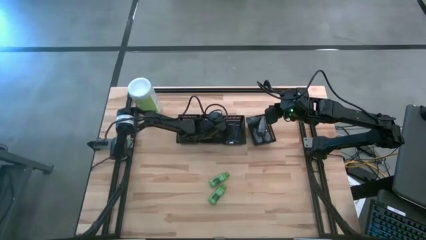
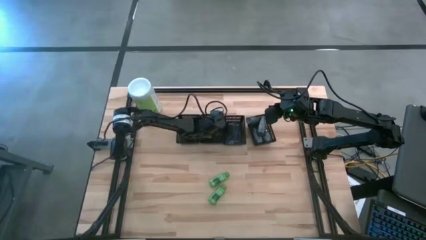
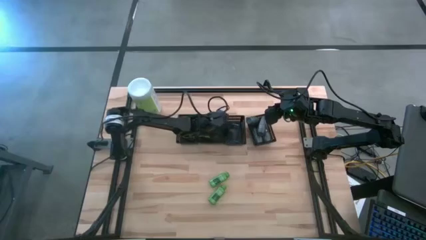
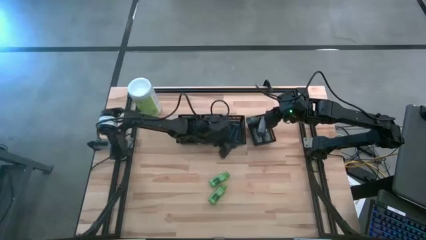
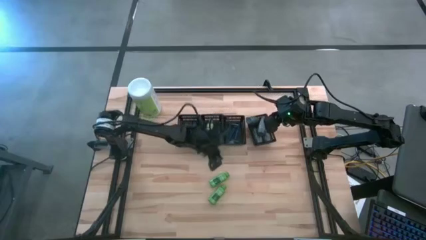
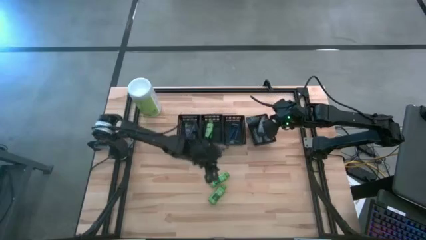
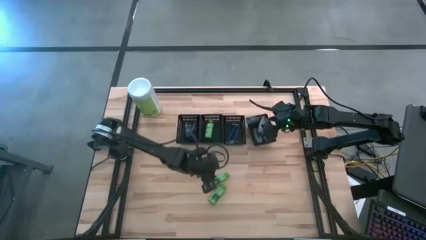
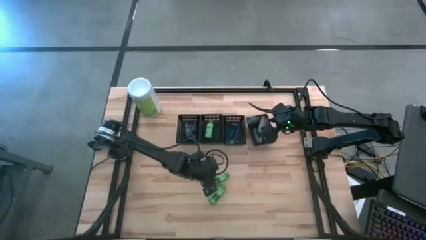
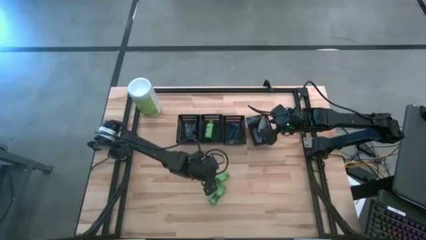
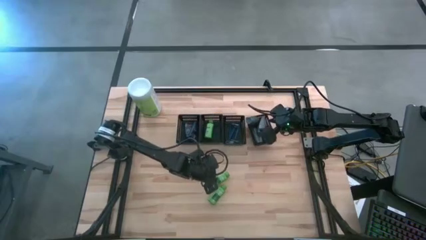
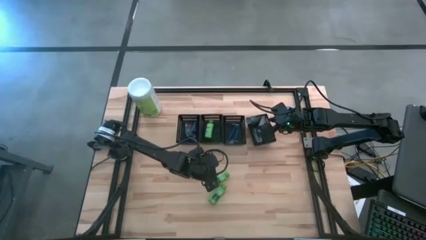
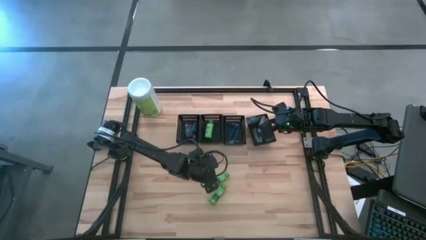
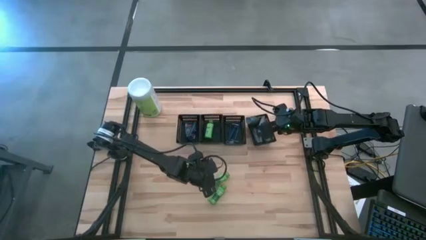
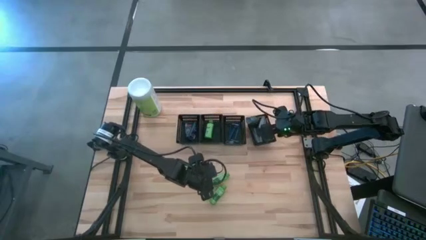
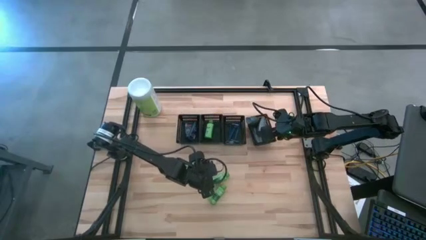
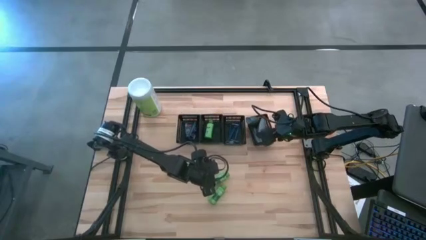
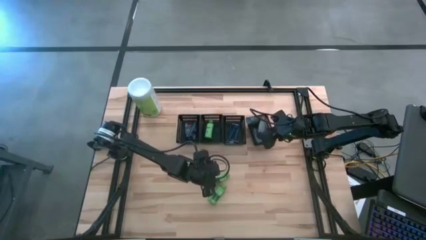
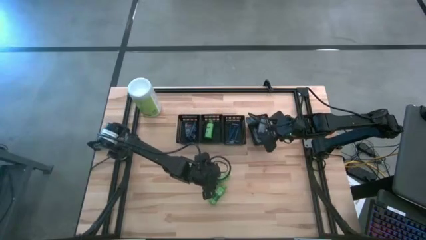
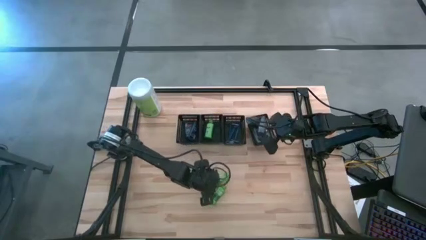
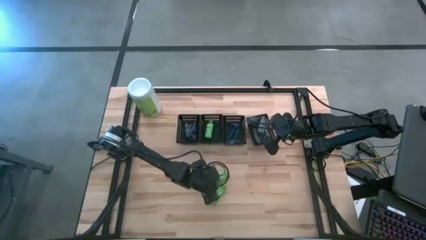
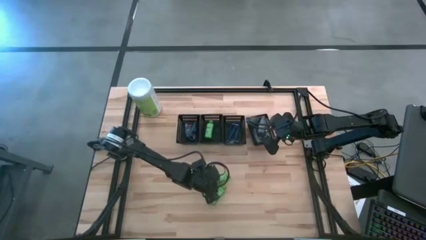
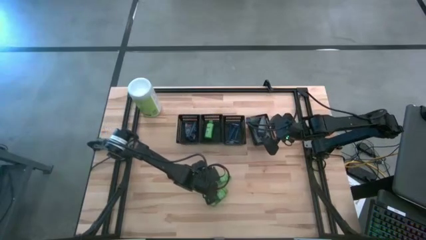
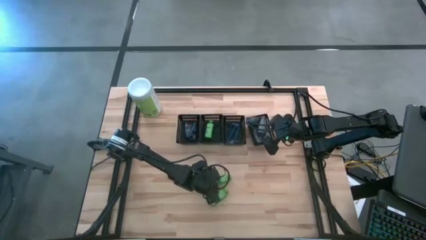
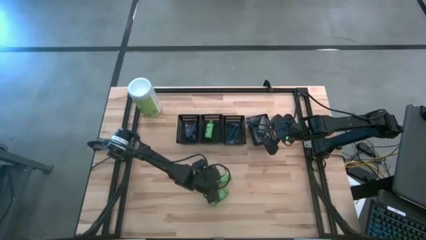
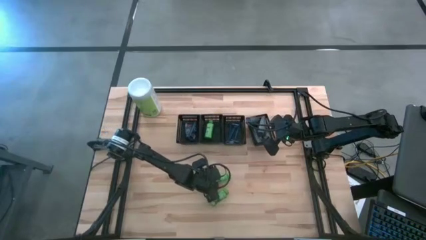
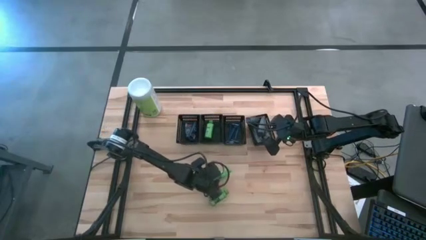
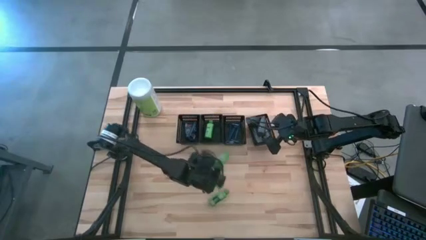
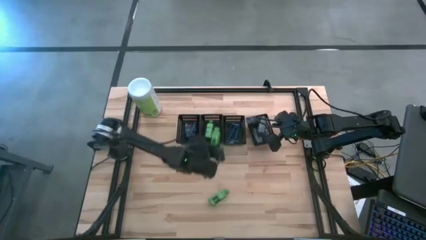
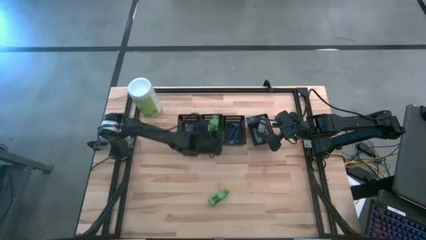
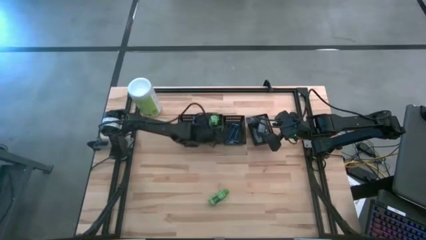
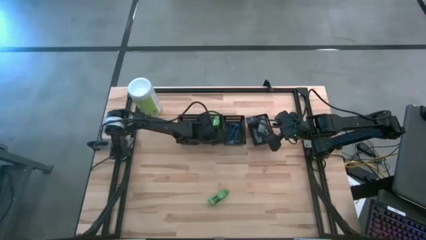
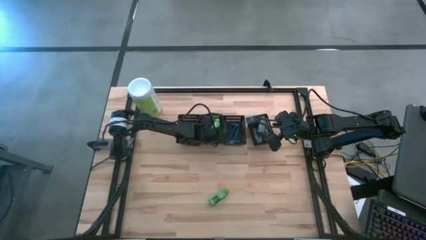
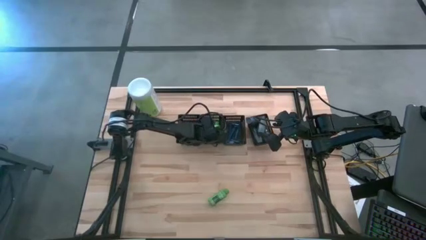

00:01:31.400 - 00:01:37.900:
Task: Pick & Place Travel size toiletries
Put the green shampoo into the middle left black bin

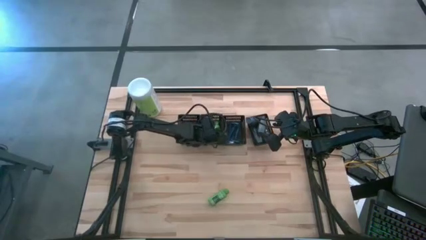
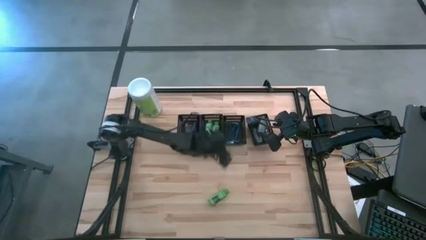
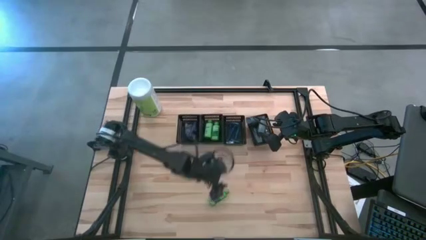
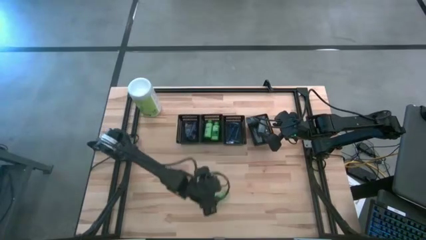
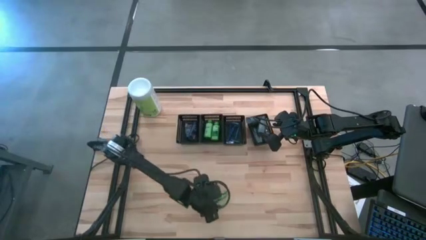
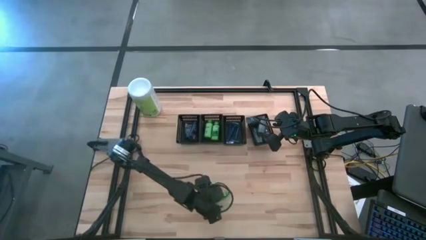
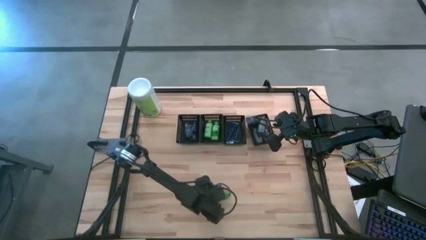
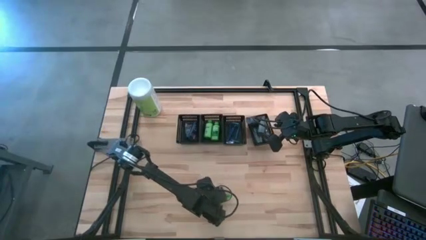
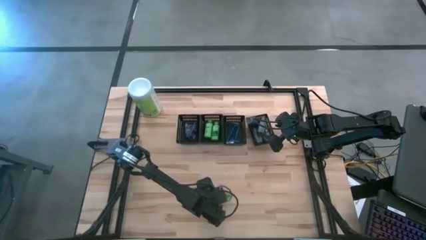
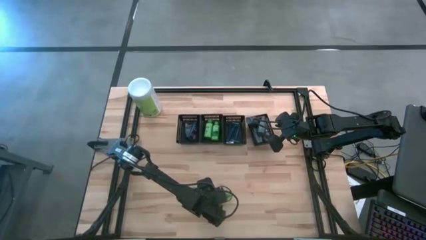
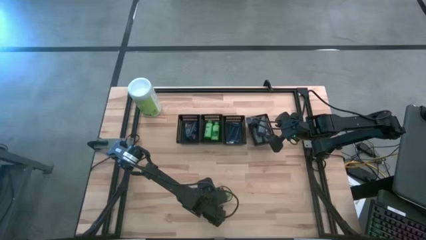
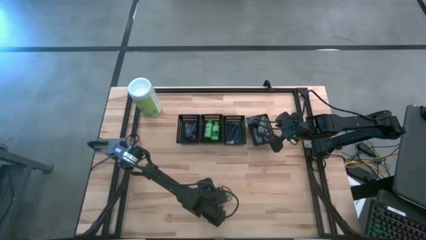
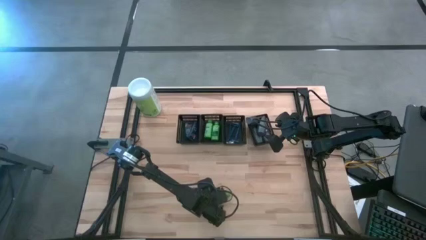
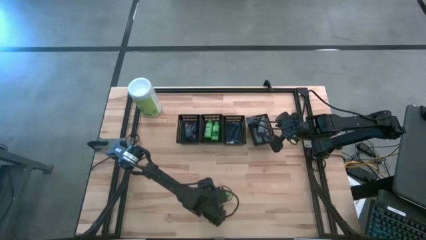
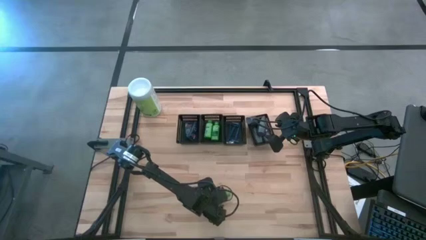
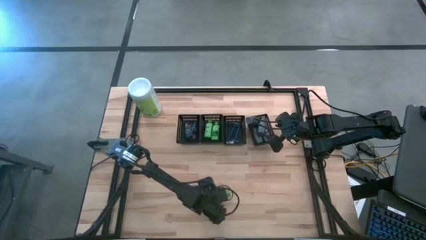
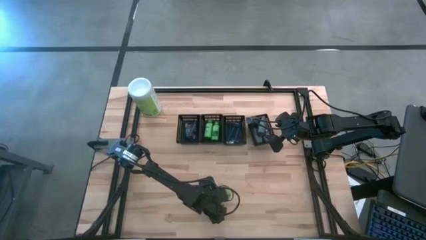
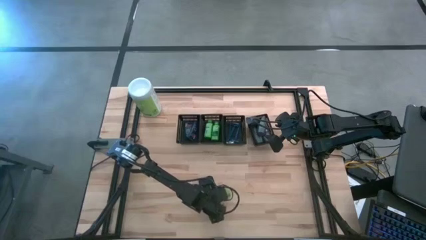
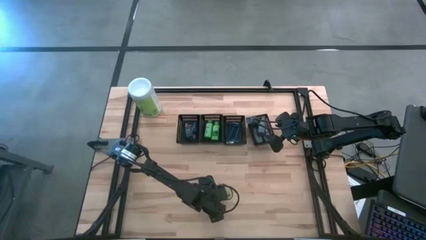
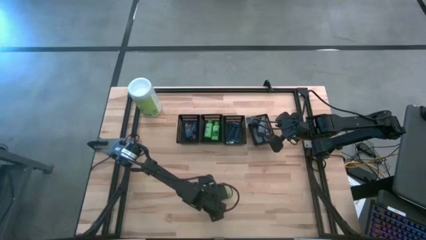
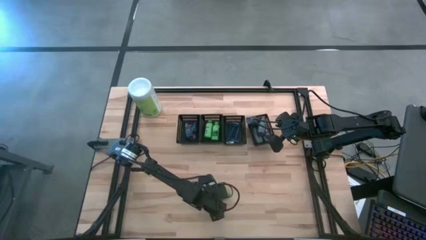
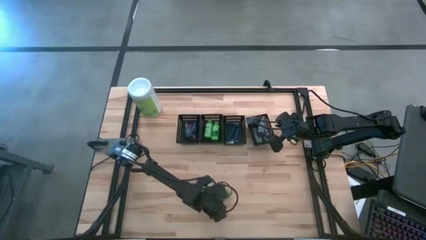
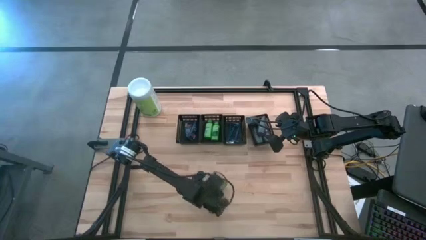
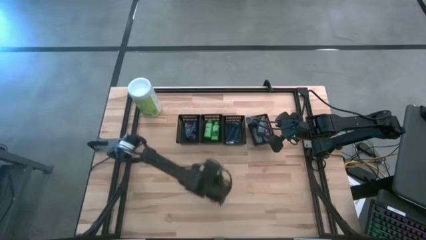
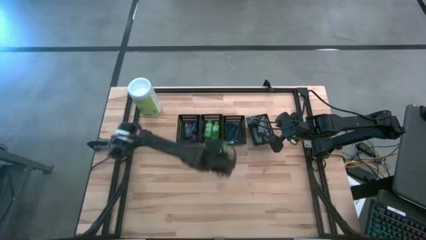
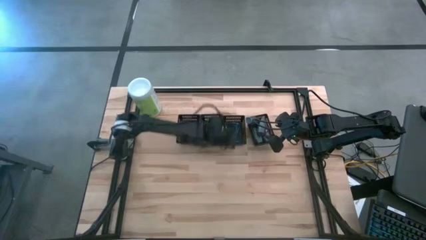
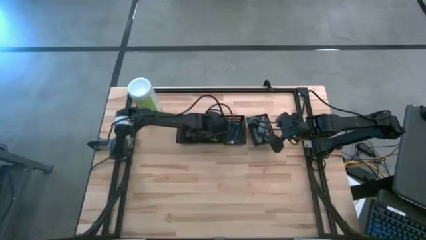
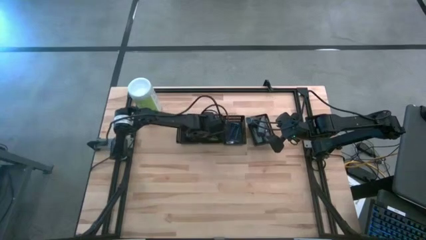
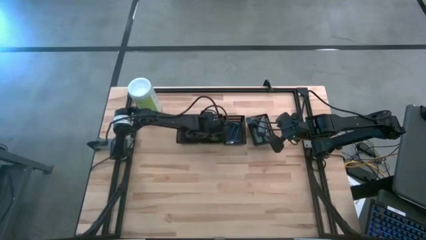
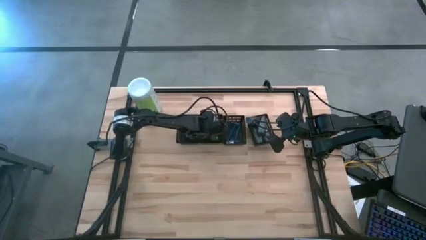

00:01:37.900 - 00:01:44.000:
Put the green shampoo into the middle left black bin

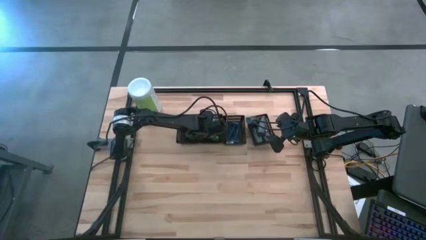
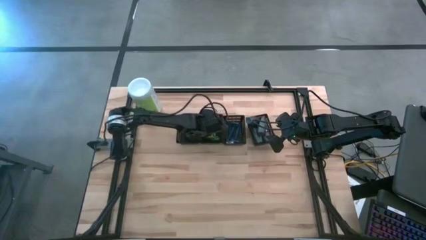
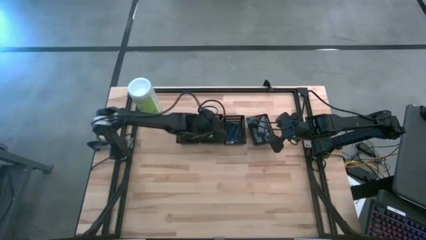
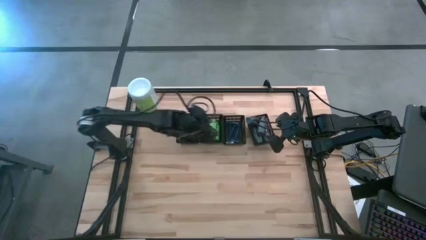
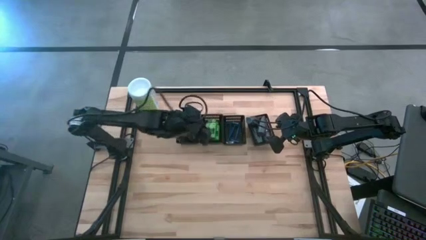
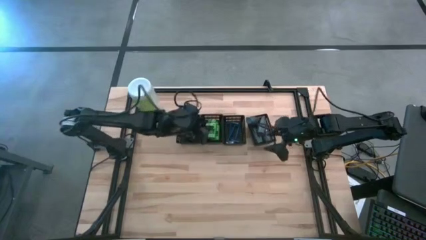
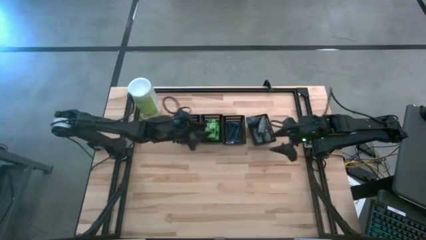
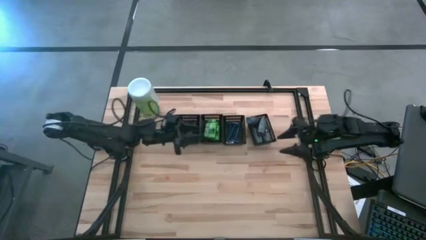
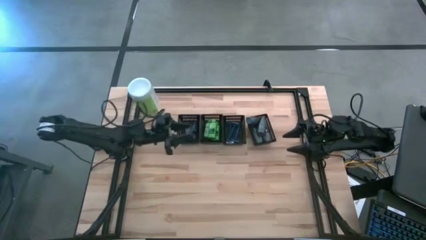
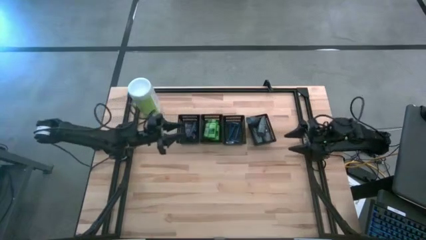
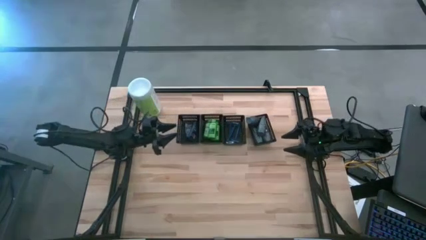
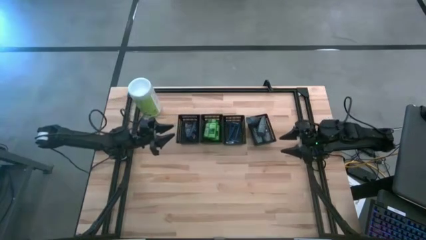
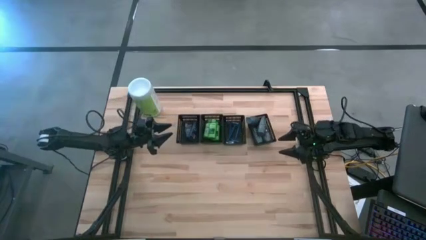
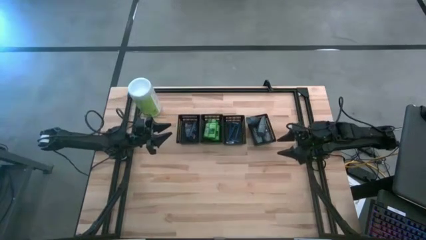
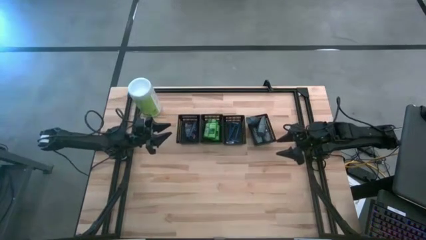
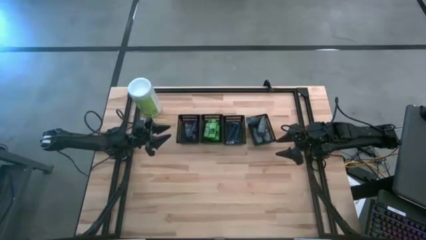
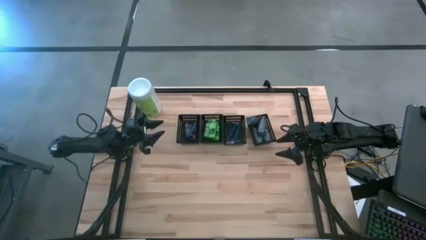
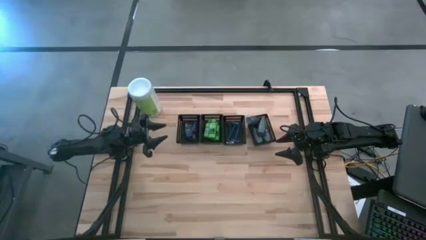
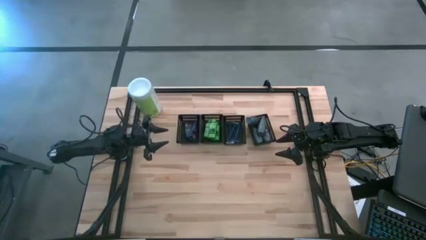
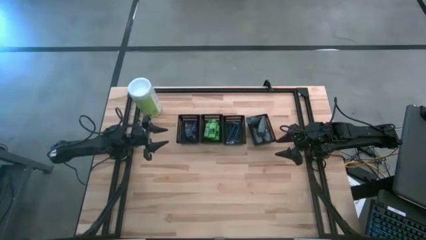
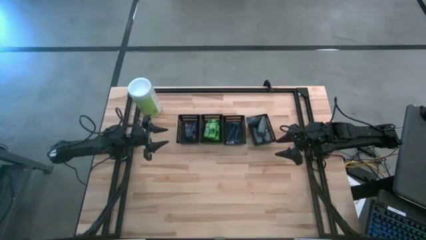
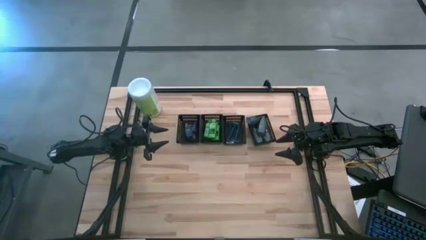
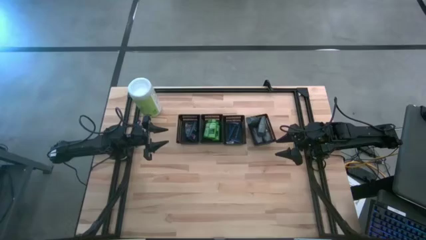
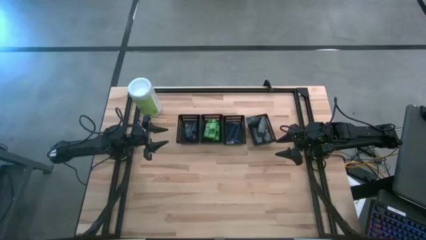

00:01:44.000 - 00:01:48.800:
Return to Home Position
